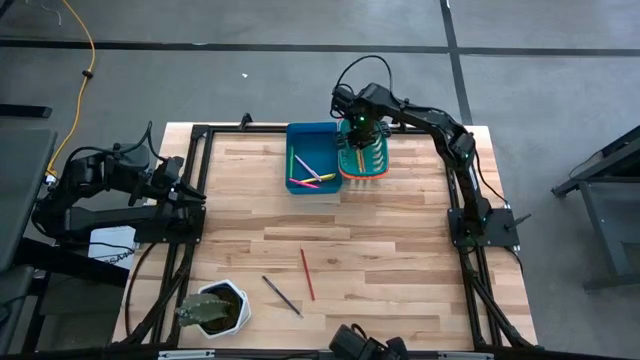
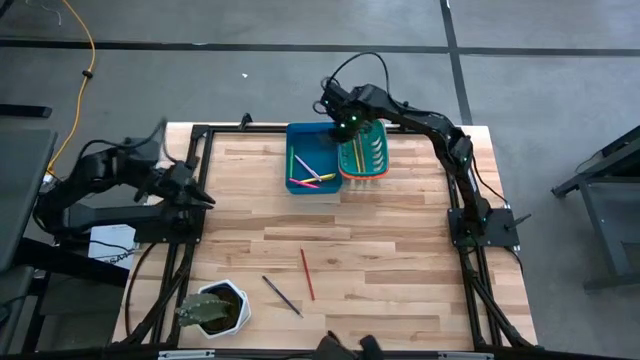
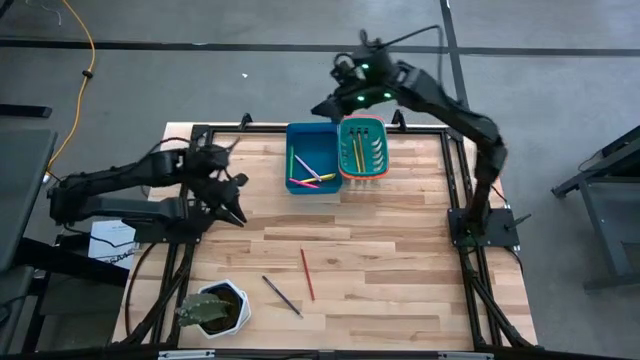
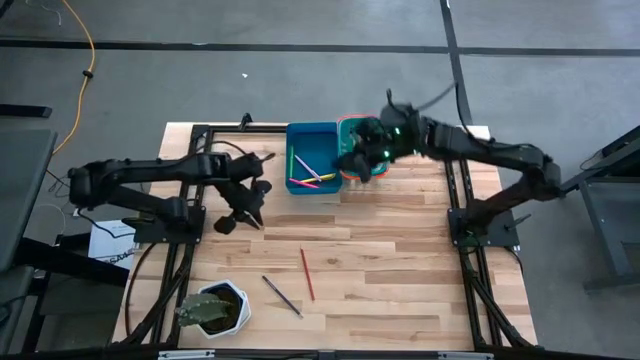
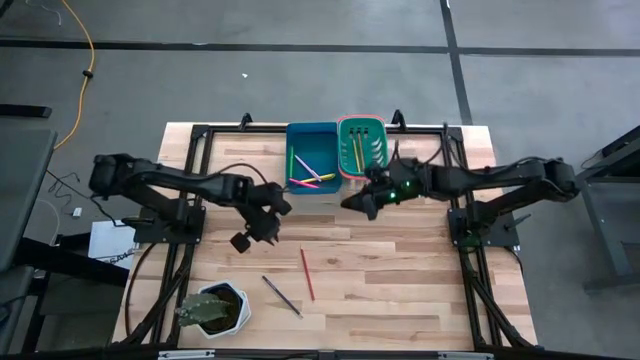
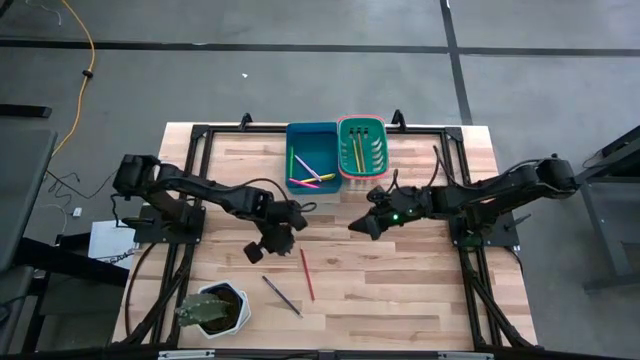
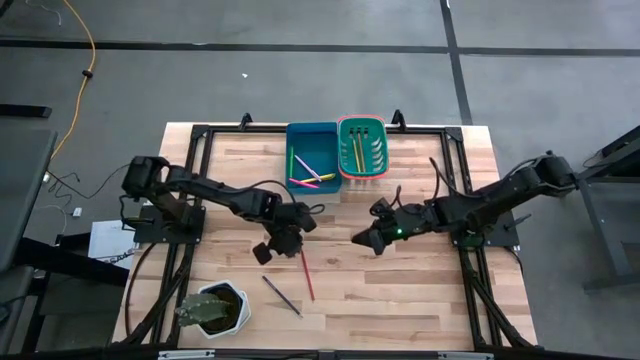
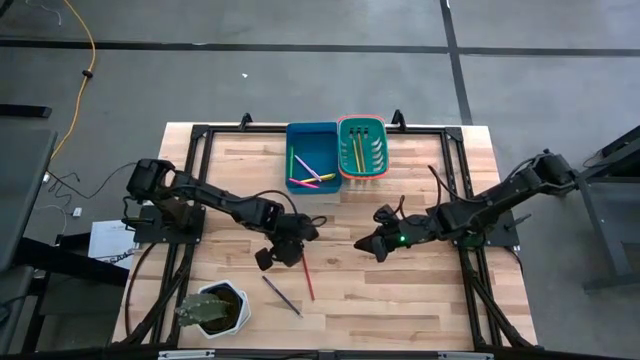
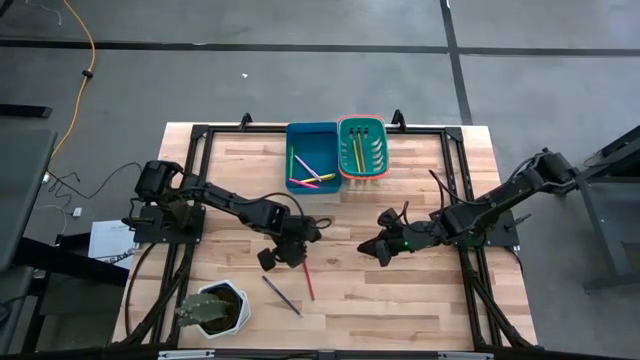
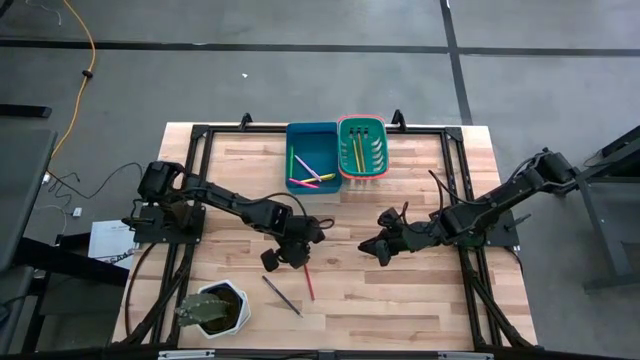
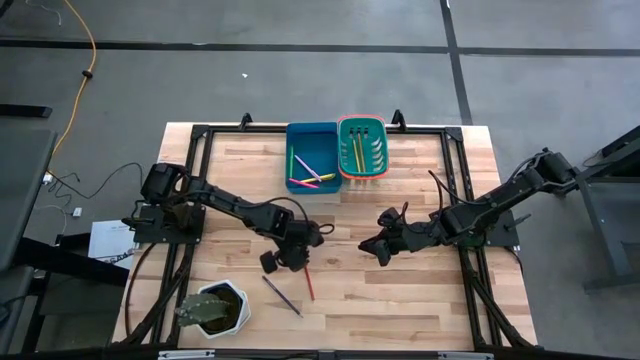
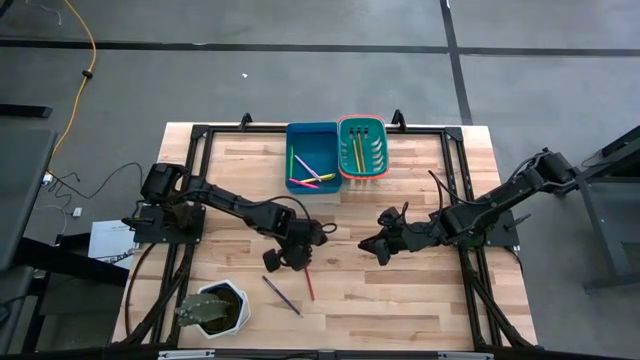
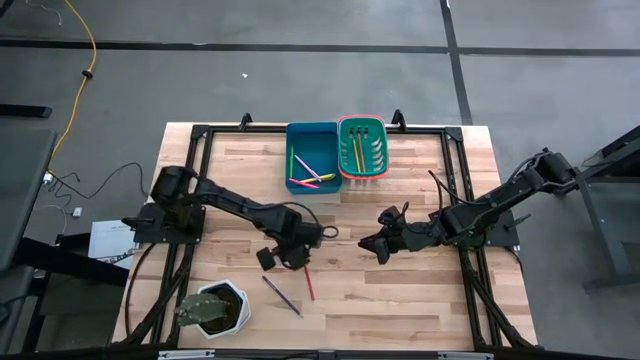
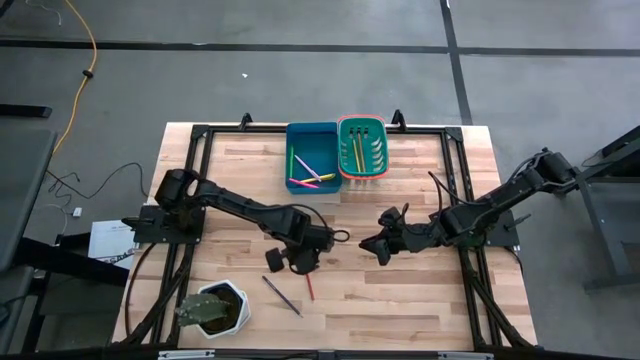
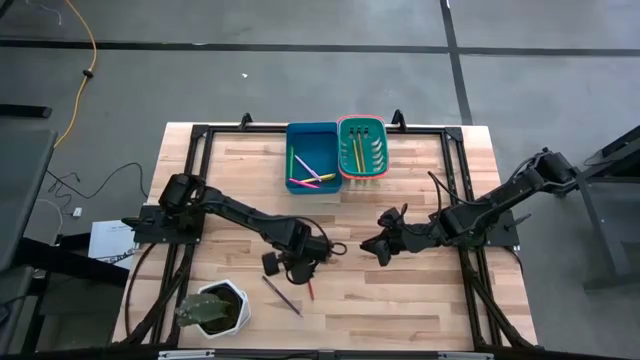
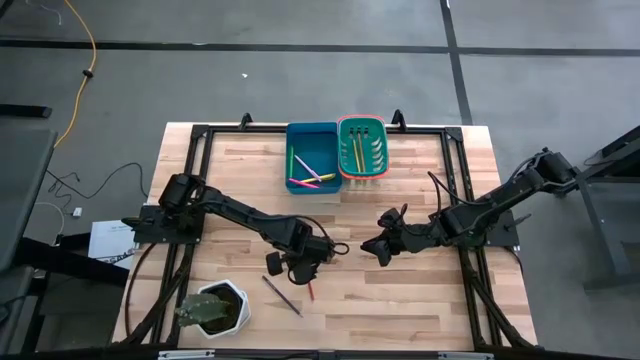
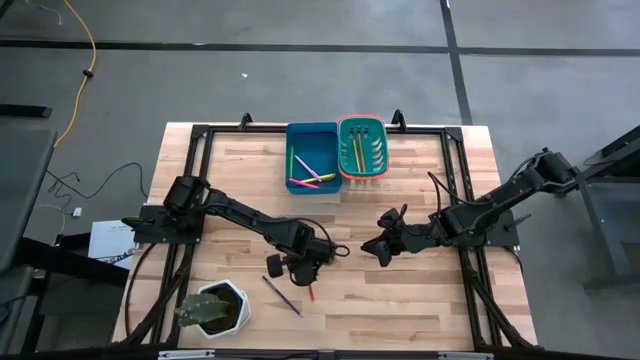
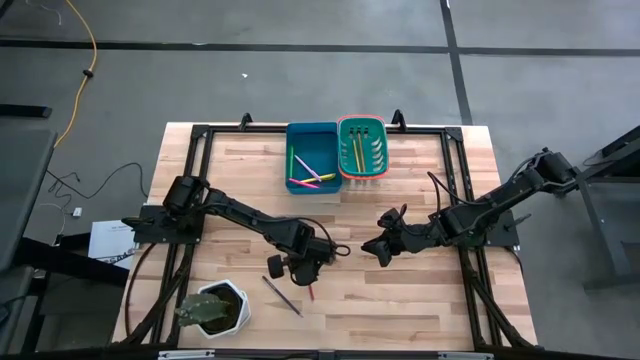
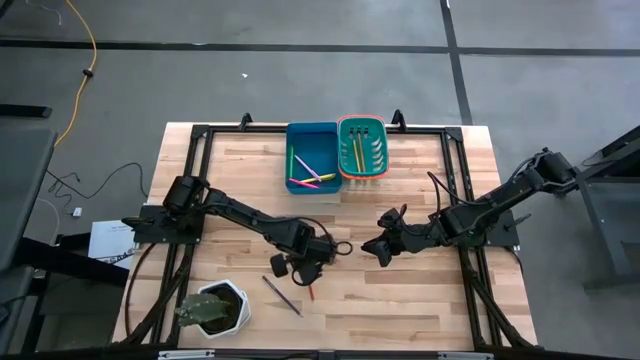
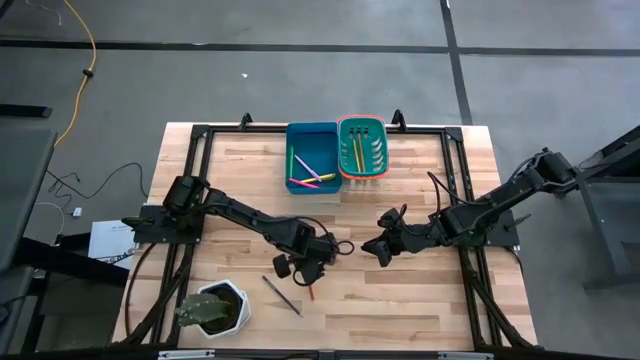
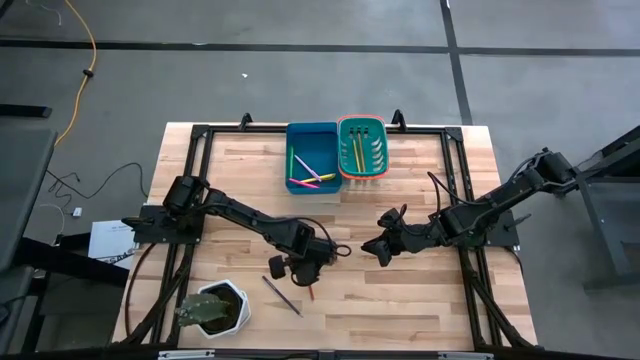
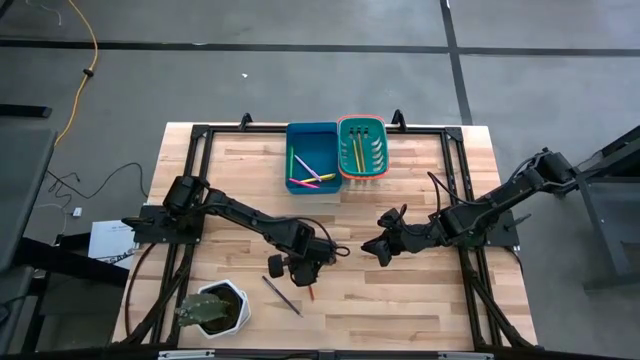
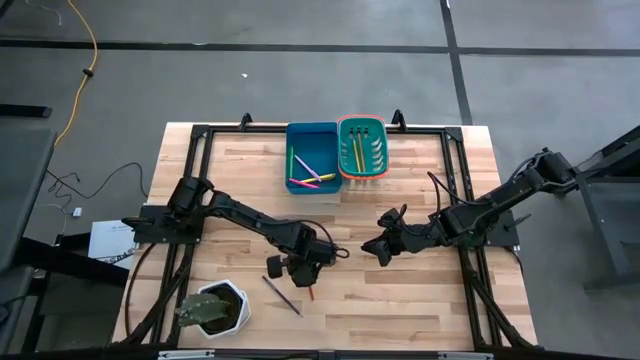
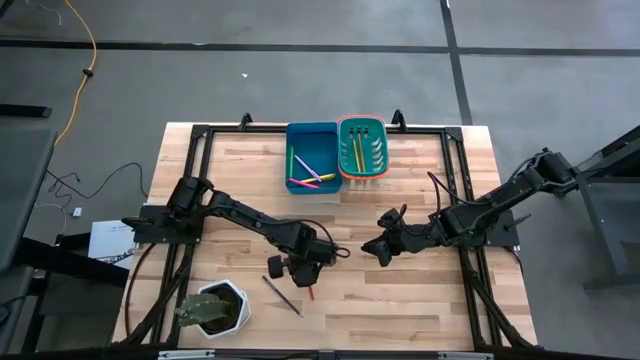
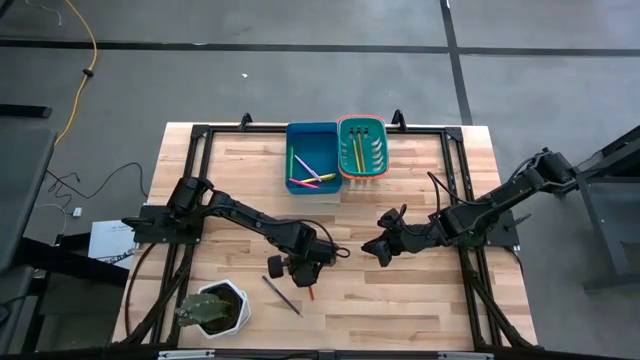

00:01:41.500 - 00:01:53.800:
Task: Sort pens & pencils
Put the red pencil into the green bin

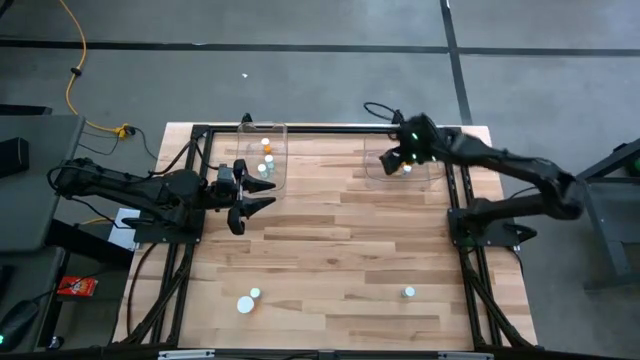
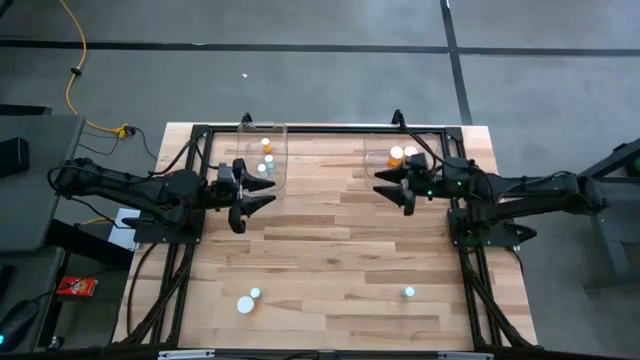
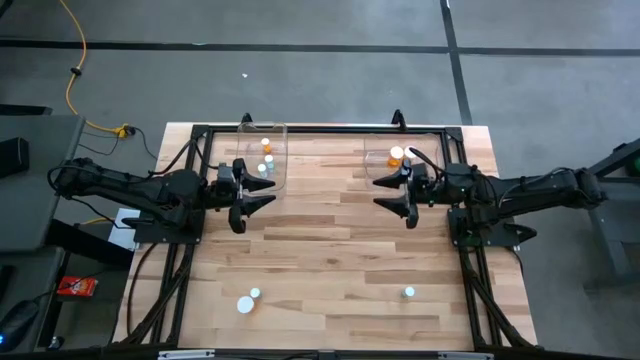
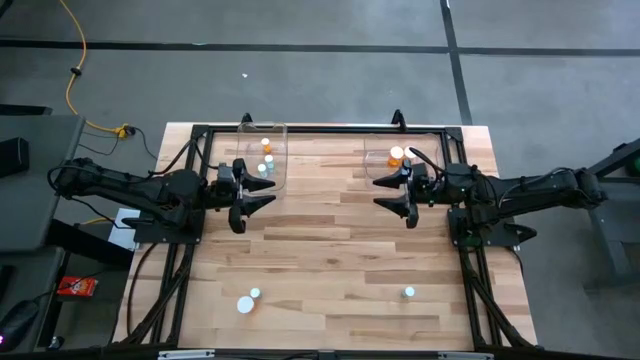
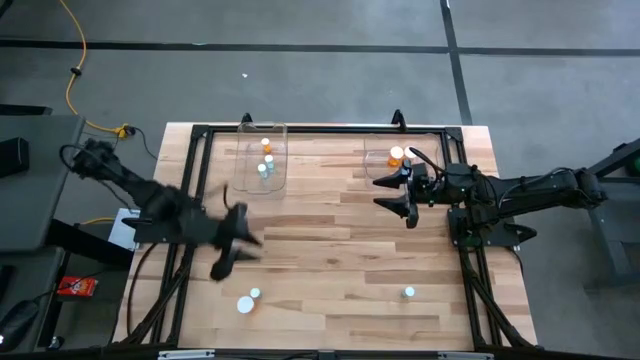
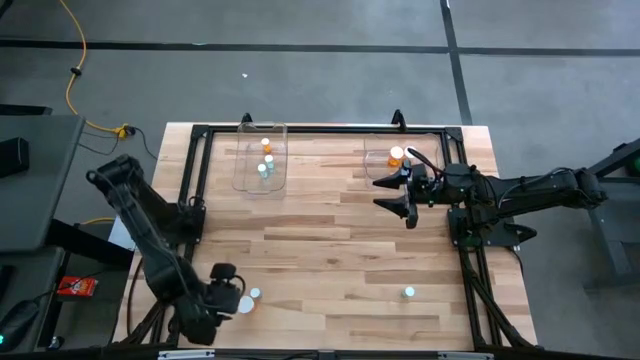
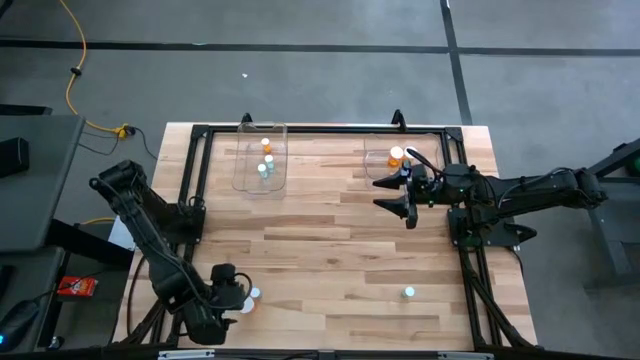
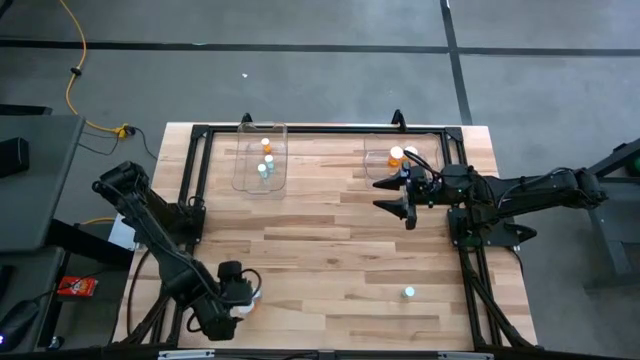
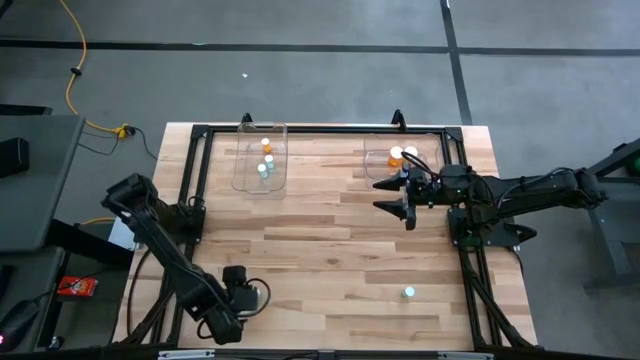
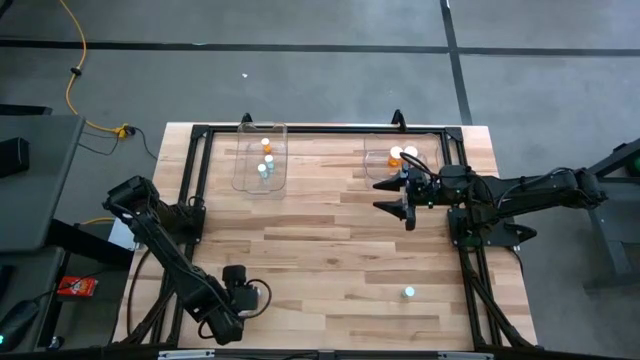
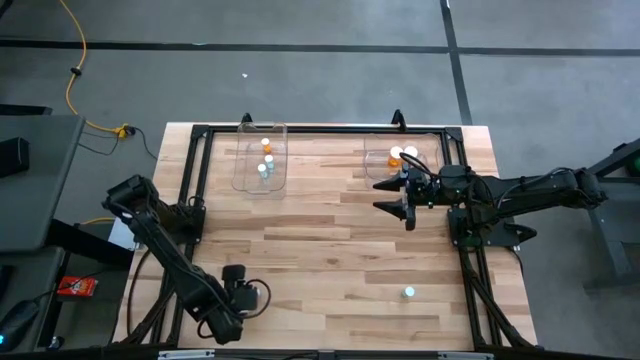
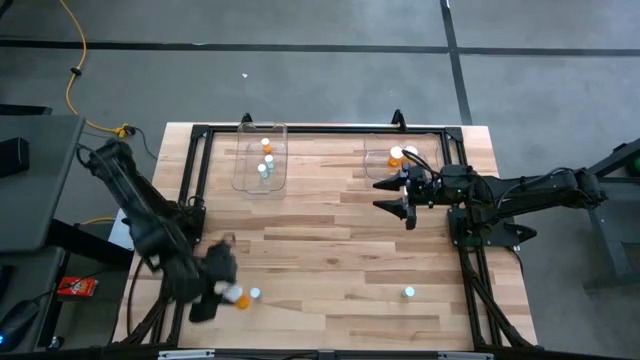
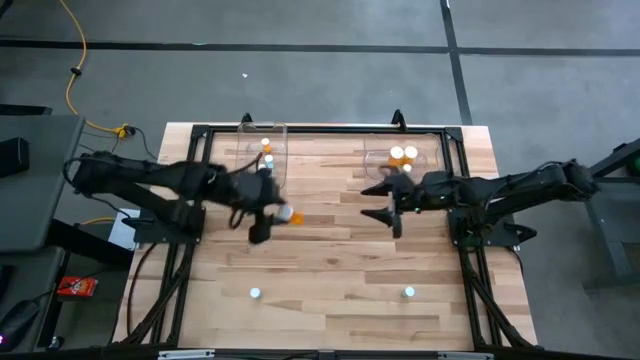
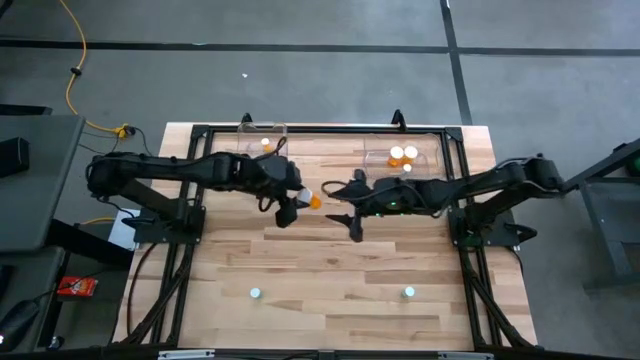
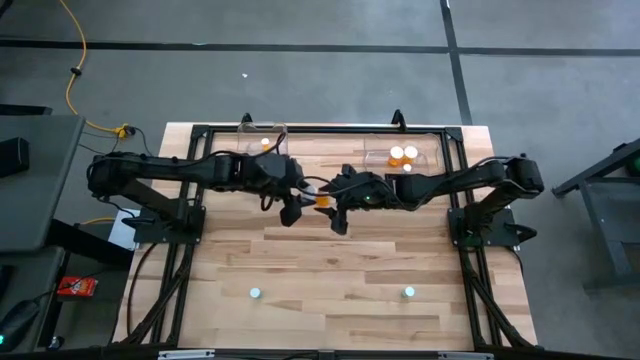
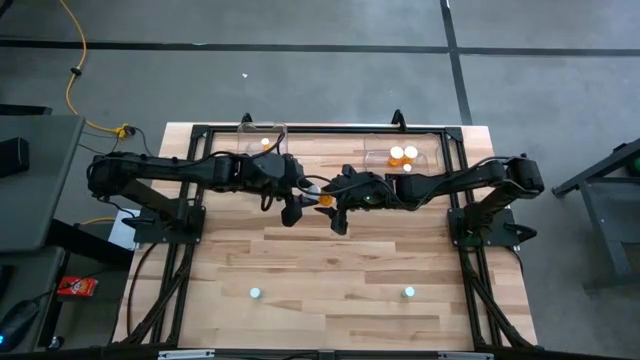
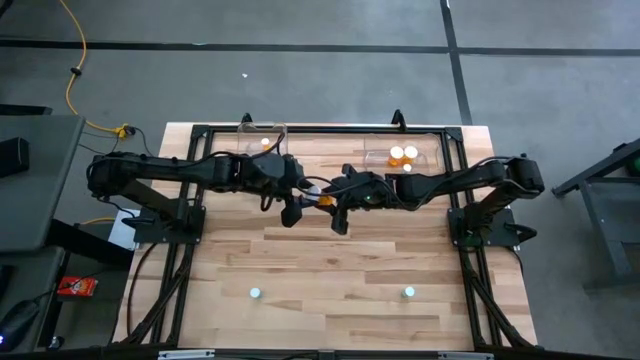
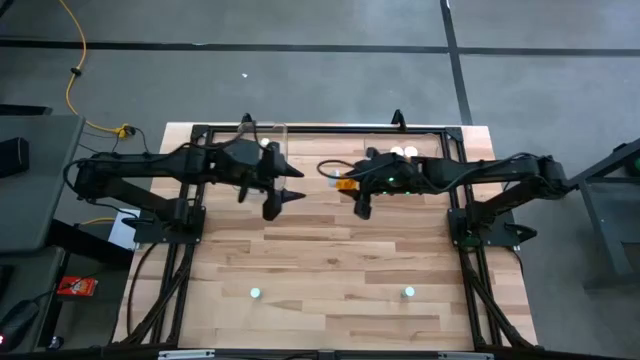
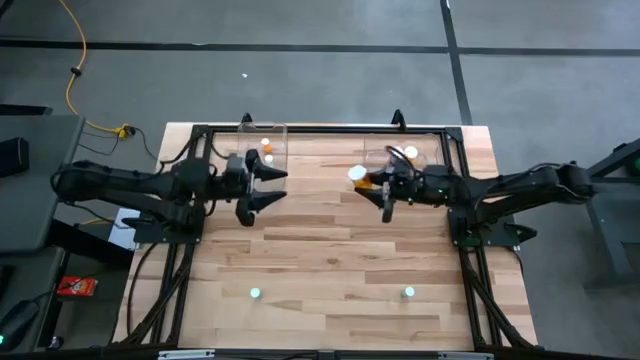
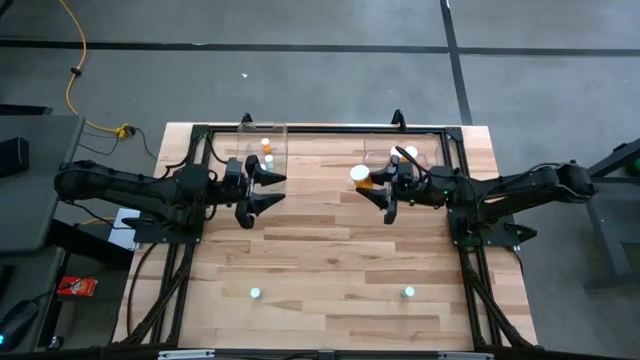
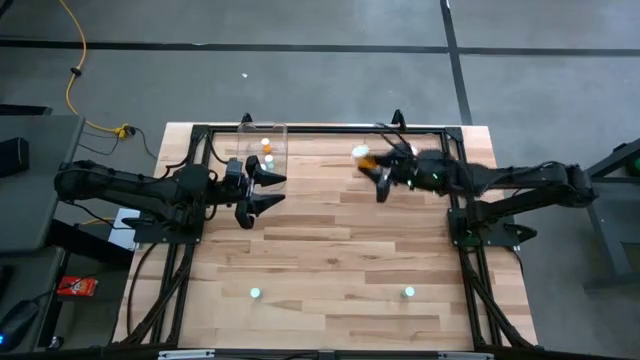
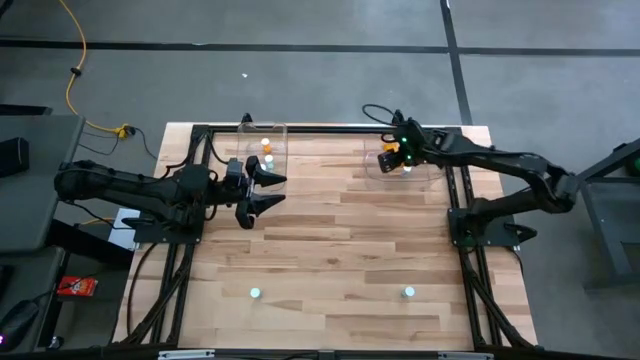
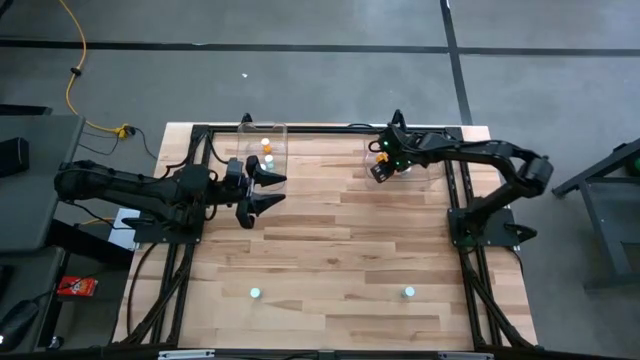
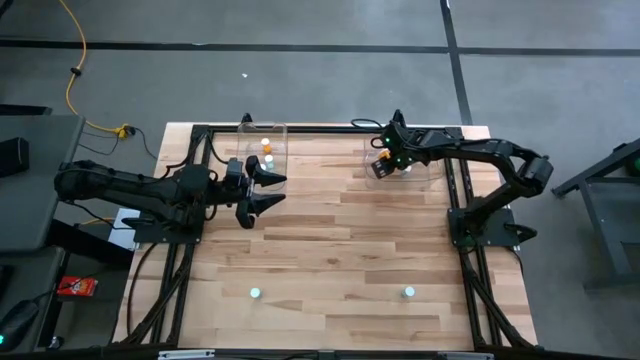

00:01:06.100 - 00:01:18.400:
Task: Pick and place medicine bottles into bin by pill shape (circle, oval)
Put the large orange pill bottle into the right transparent bin
